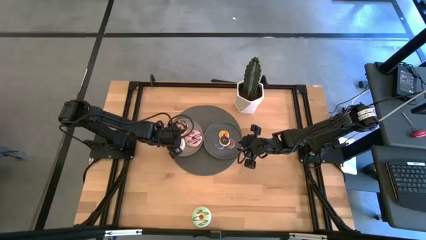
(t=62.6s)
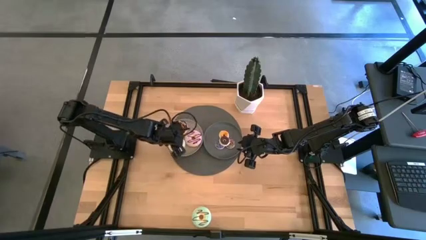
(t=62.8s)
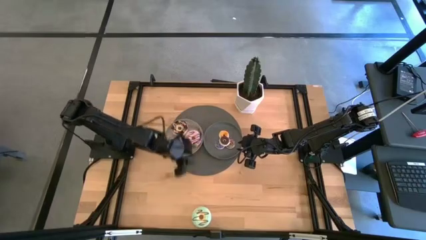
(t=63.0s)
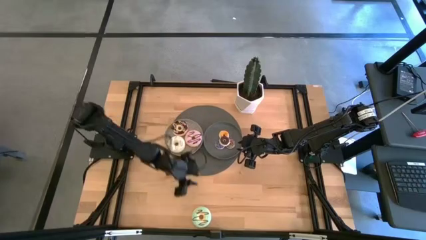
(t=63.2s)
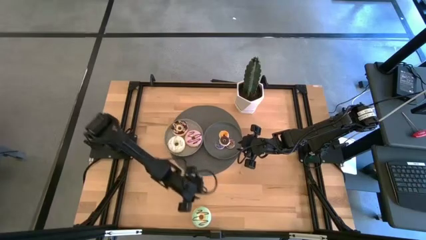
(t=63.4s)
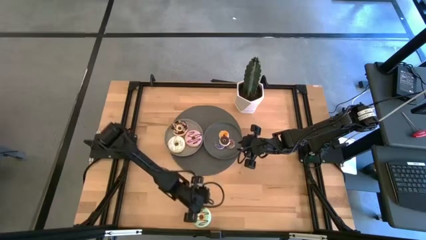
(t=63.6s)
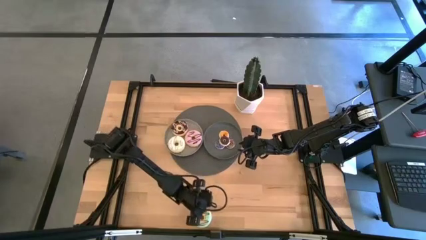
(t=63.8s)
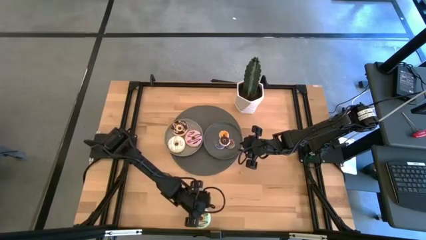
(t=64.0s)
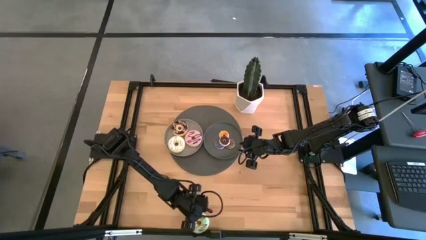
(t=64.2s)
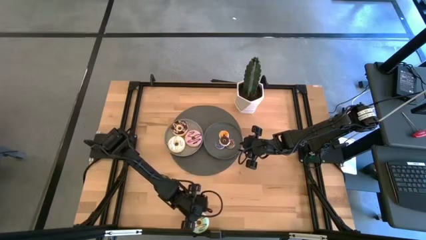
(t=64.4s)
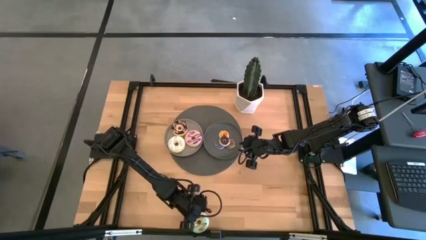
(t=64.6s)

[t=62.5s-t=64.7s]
Task: Pick & Place donuts
Put the large green donut on the light gray plate

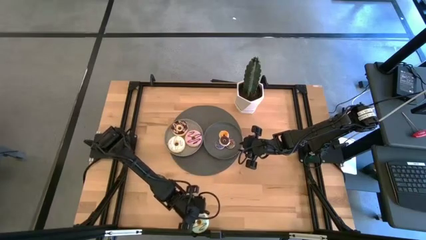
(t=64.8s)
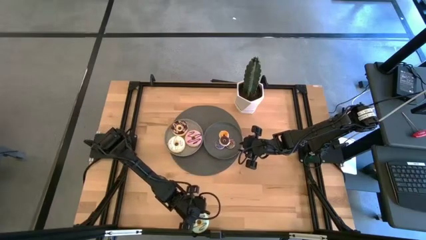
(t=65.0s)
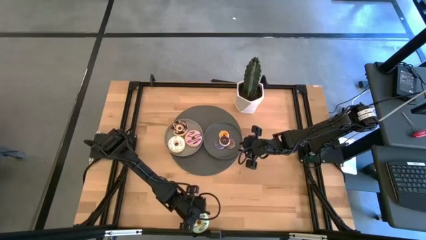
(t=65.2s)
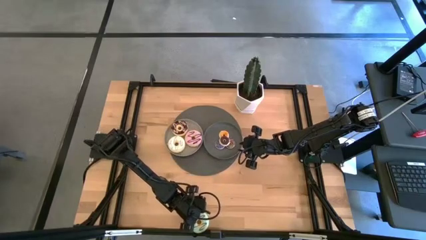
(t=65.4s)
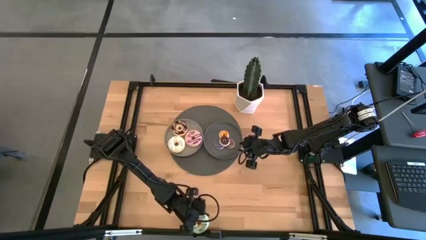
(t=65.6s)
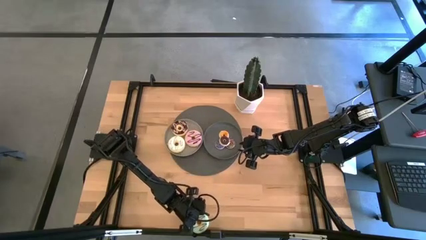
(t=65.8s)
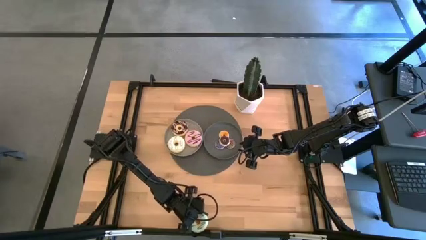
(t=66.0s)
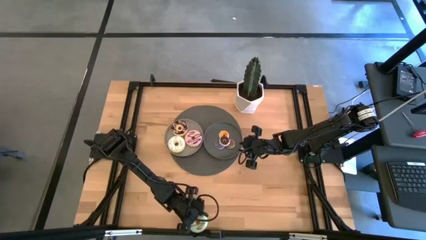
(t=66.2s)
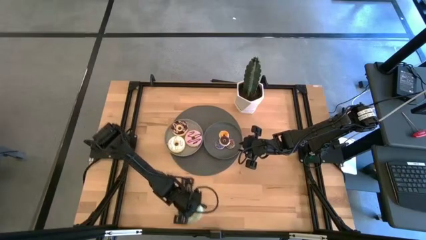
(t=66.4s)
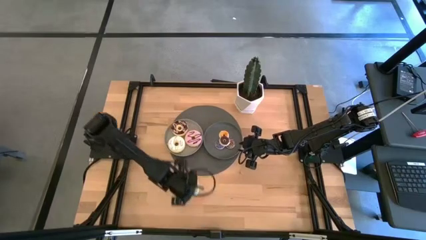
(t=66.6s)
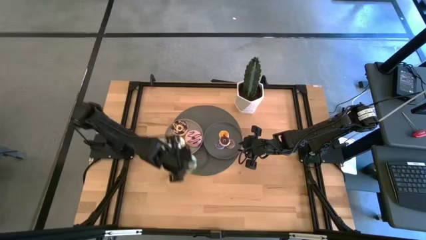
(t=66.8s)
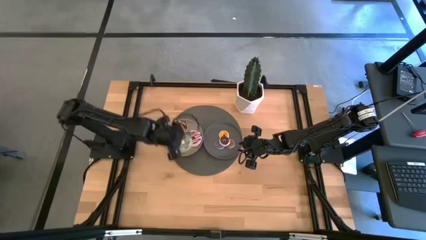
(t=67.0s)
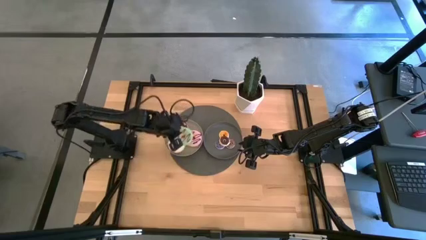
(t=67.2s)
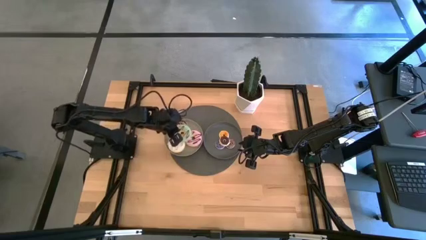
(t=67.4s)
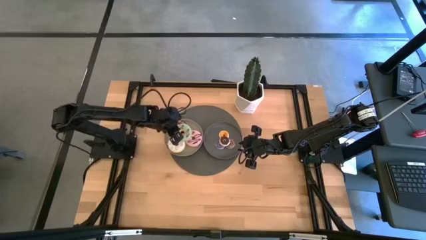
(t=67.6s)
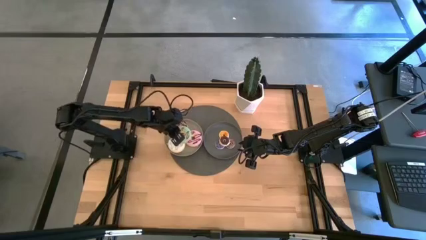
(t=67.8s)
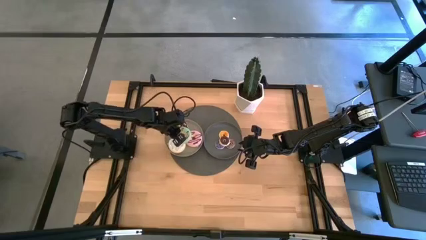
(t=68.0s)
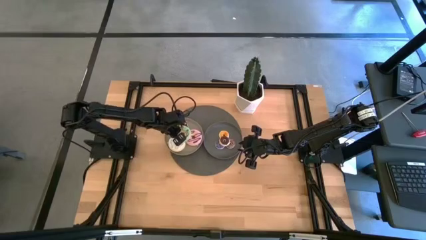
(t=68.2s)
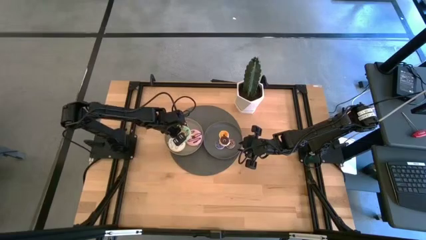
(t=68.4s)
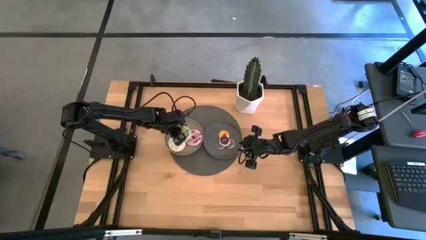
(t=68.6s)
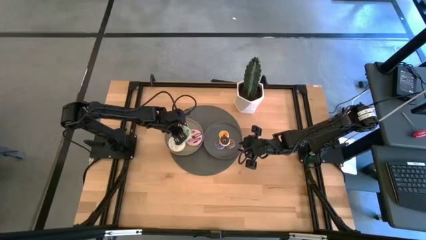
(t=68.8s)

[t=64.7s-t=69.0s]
Put the large green donut on the light gray plate

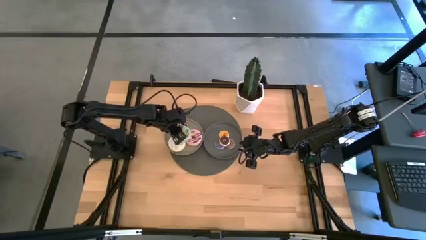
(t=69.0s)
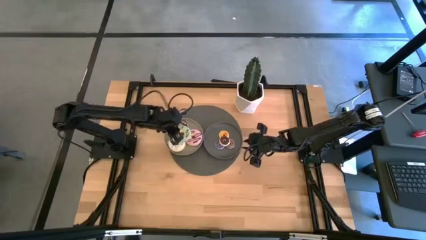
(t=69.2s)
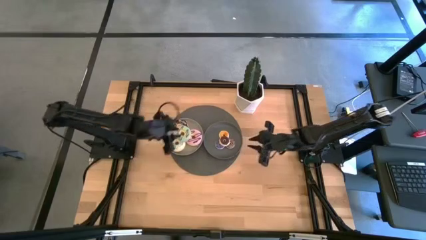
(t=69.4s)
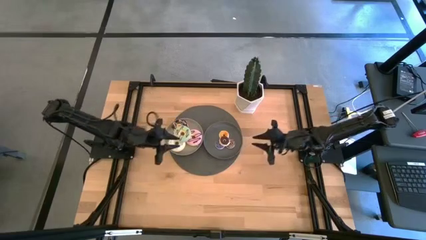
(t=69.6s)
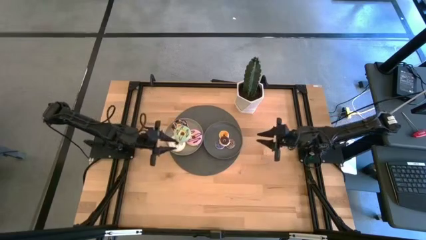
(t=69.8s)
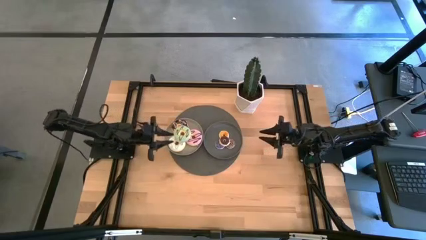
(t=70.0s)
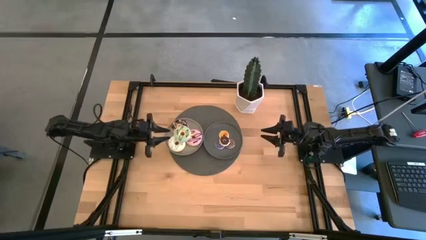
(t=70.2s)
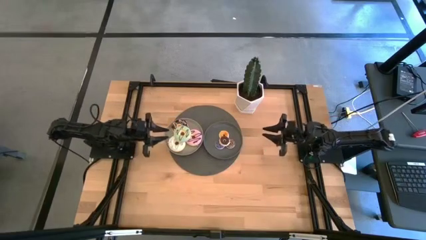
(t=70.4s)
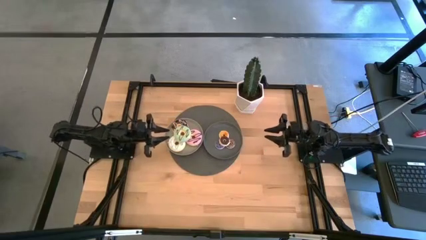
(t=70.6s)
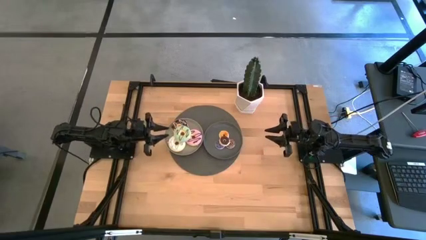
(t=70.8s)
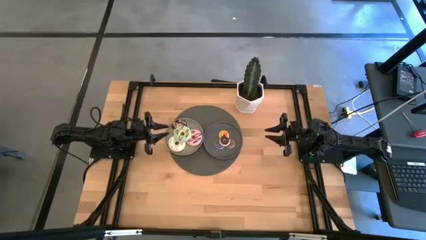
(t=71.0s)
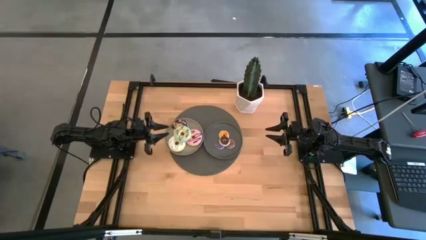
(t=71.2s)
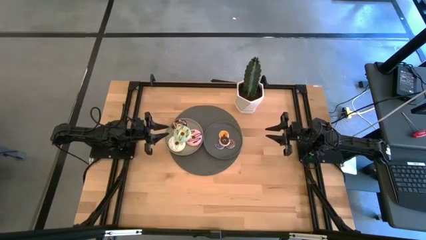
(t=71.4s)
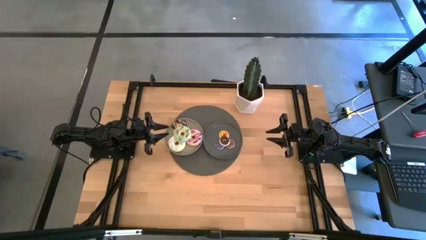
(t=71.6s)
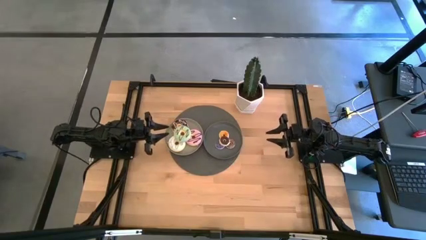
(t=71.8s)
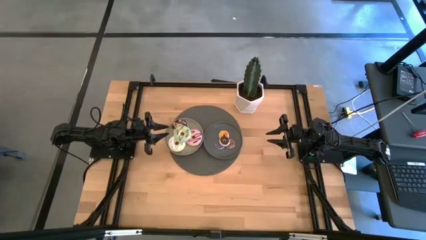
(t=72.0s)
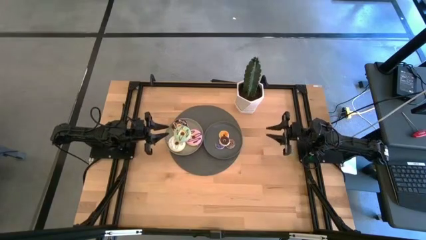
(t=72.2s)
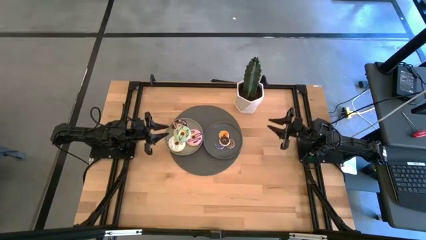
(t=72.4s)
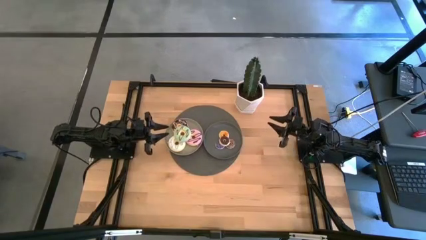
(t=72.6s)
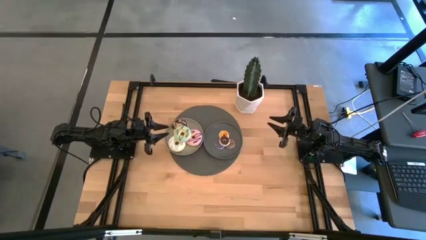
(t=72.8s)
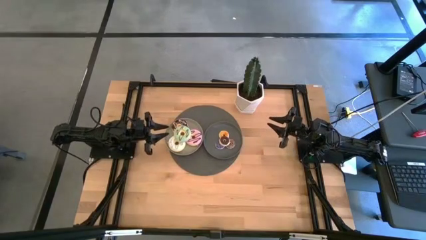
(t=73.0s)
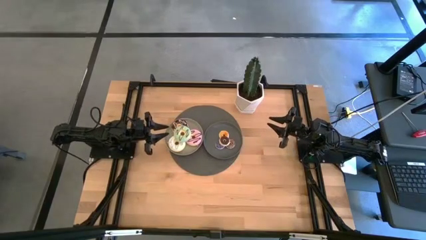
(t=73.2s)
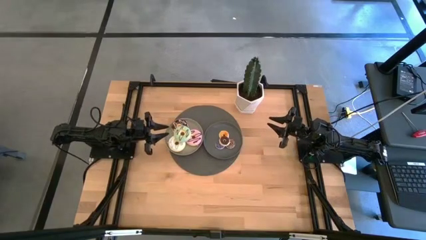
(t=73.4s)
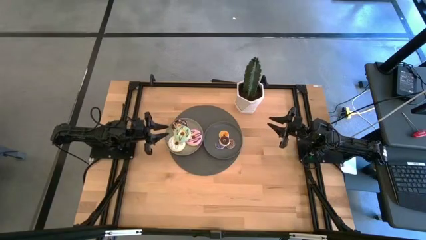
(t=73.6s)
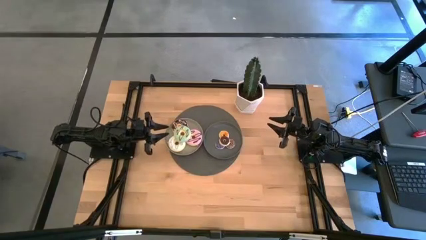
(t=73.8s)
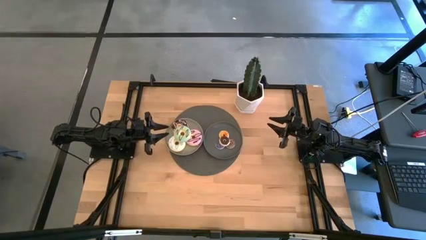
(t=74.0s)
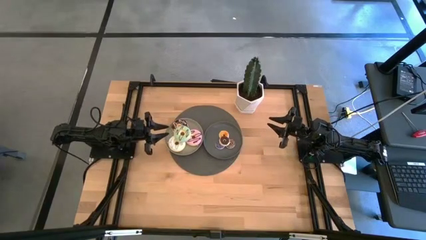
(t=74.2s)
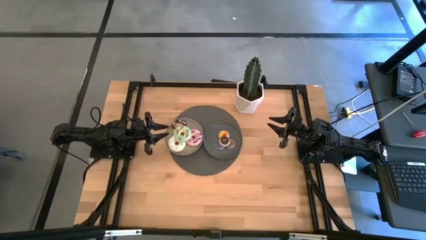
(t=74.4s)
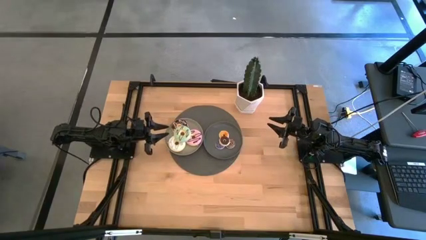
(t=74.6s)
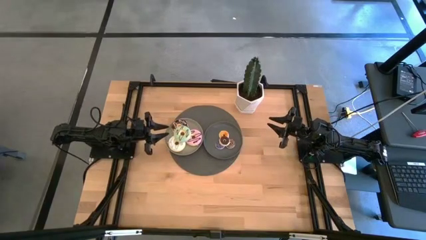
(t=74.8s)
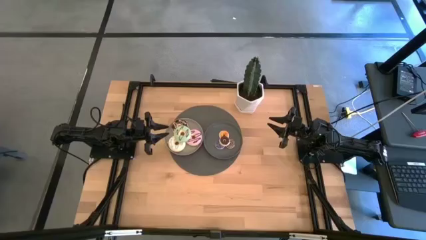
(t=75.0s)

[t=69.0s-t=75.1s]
Return to Home Position

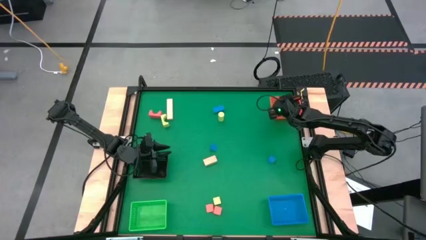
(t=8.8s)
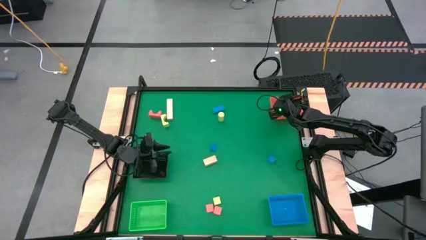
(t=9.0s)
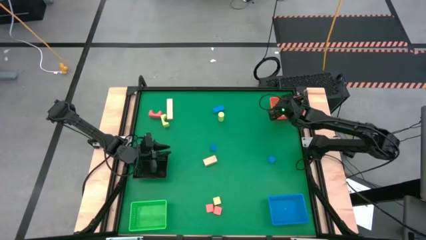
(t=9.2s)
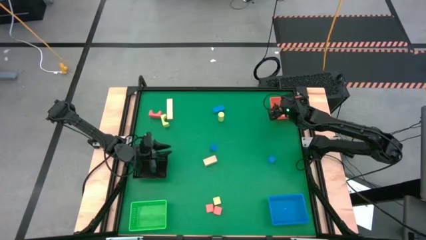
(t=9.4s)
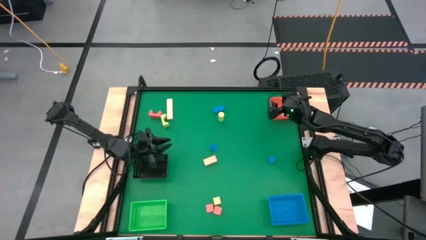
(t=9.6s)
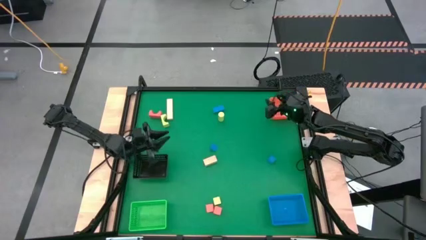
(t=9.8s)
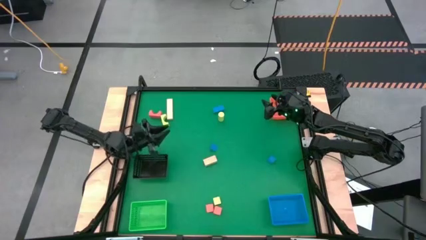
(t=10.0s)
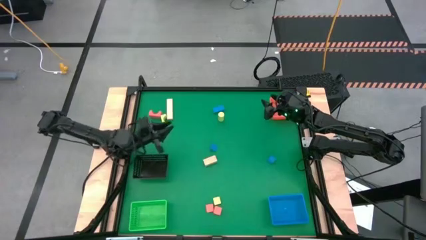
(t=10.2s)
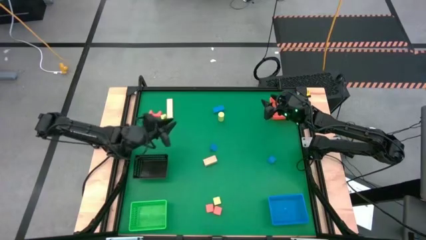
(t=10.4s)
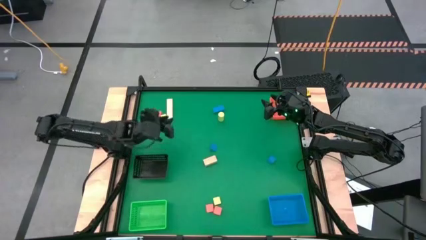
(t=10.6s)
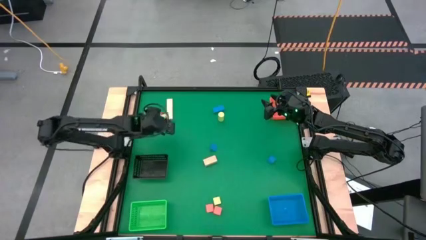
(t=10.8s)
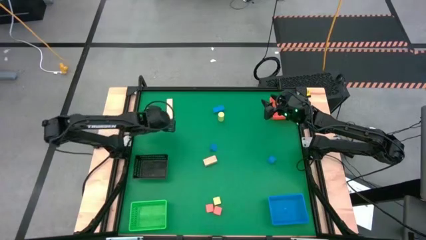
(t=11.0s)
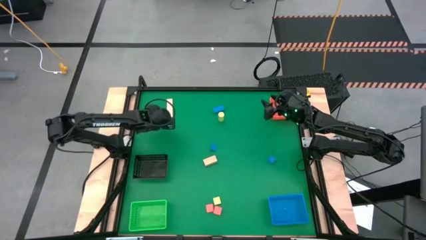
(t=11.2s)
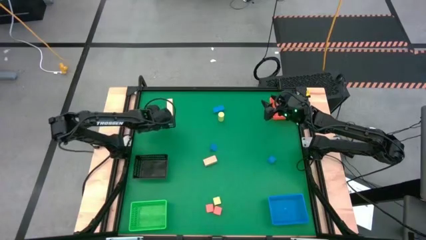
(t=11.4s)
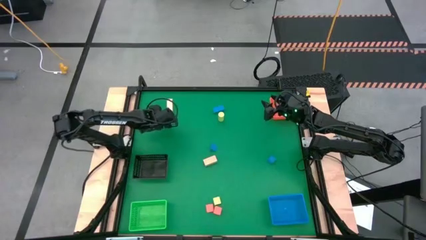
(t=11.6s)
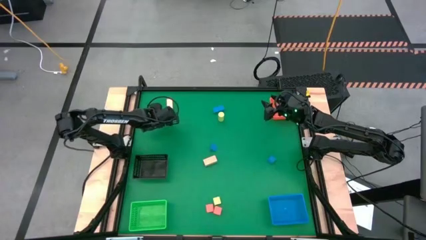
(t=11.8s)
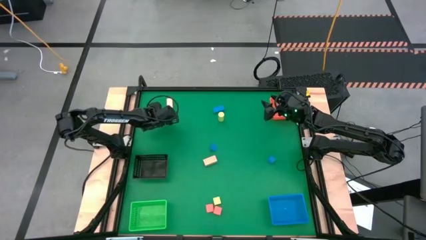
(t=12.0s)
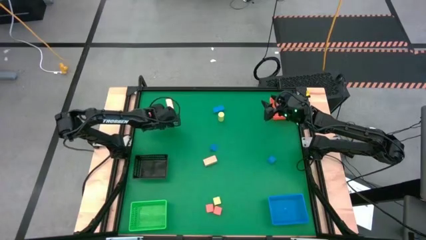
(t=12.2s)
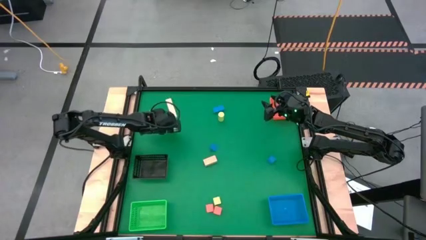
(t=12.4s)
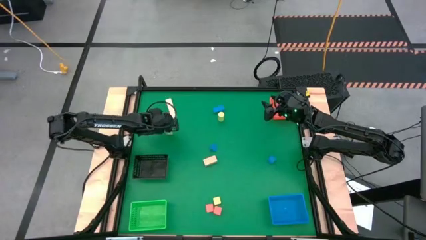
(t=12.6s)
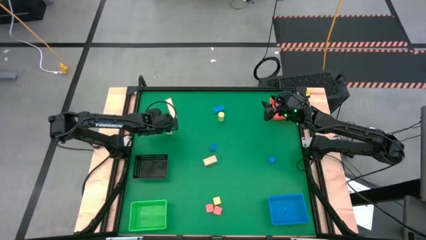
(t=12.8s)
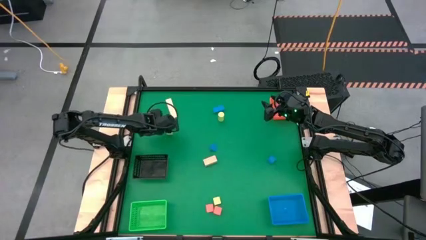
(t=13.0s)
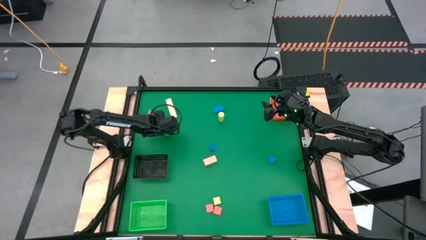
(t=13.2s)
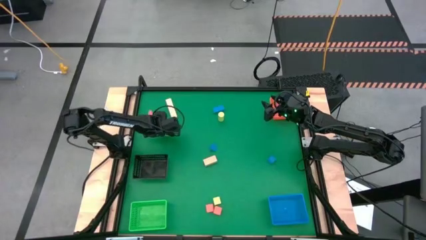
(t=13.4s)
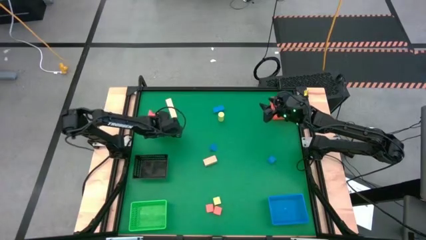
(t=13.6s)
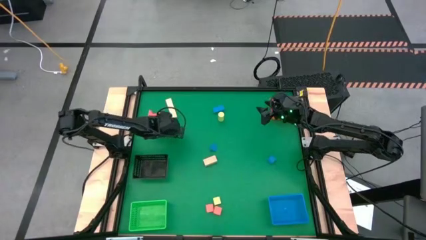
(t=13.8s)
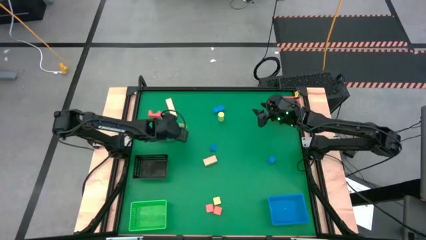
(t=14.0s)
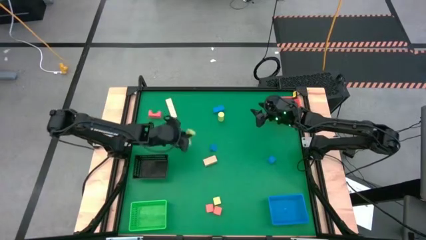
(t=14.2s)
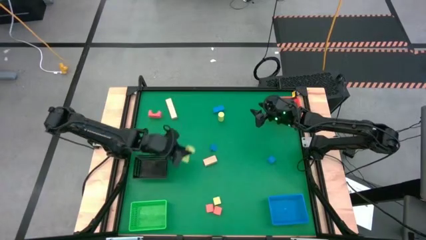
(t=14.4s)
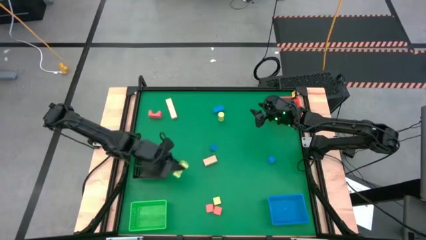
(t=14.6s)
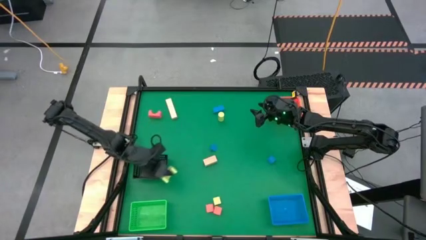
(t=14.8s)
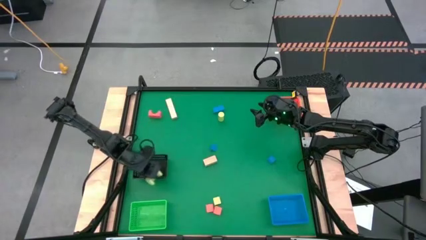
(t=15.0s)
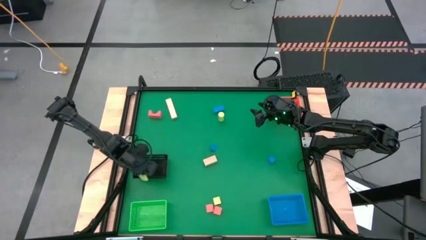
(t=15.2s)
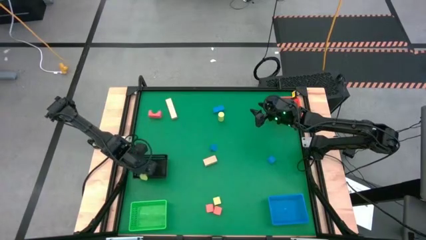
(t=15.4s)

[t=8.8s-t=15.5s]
Task: Sort & place blocks by color
Put the left yellow wooden block into the black basket
